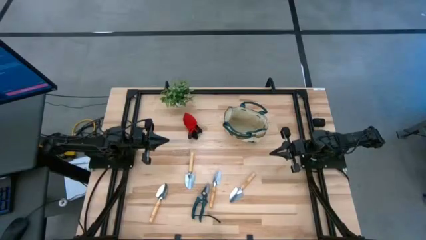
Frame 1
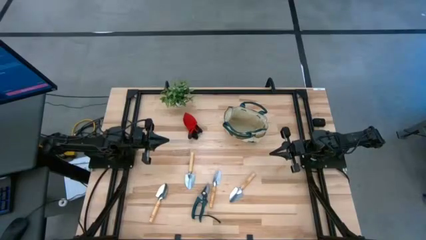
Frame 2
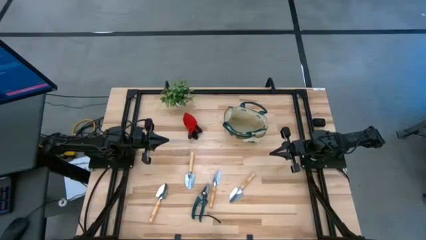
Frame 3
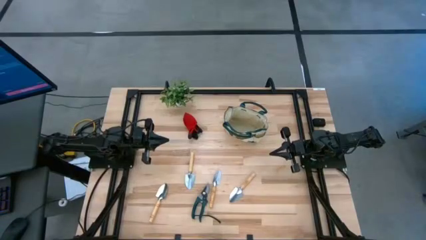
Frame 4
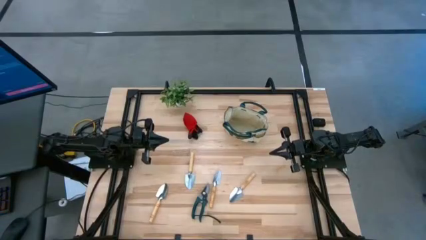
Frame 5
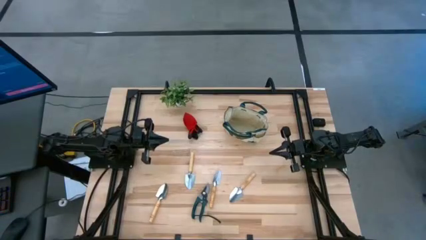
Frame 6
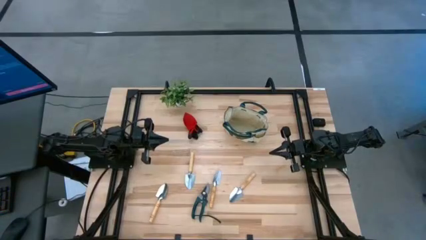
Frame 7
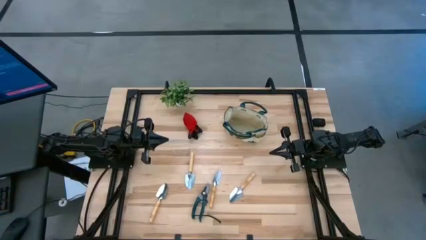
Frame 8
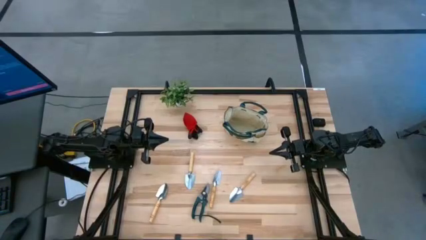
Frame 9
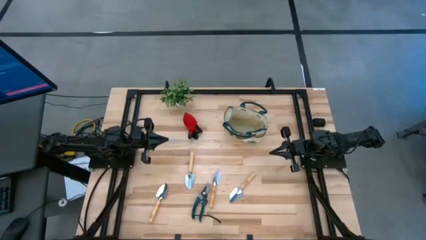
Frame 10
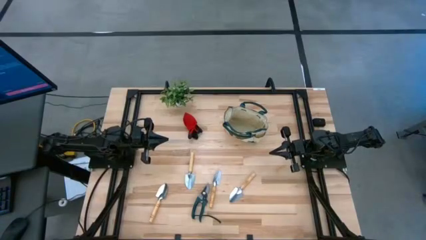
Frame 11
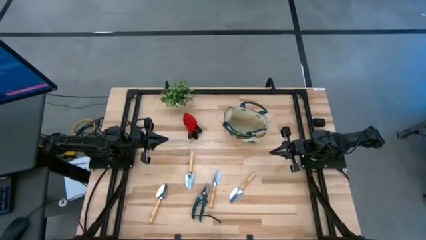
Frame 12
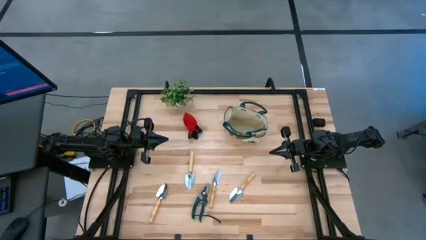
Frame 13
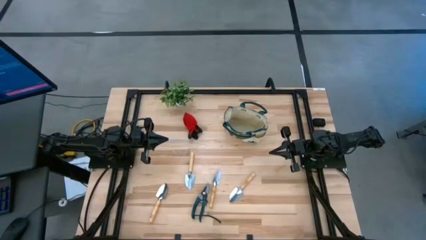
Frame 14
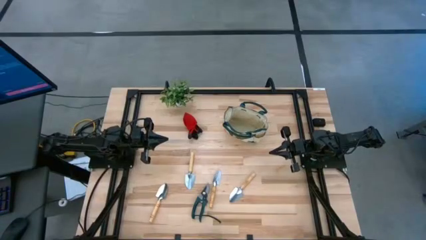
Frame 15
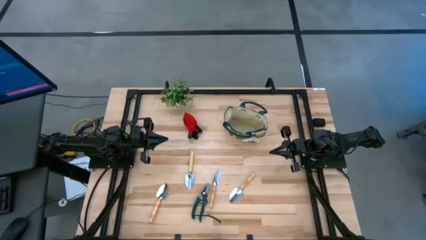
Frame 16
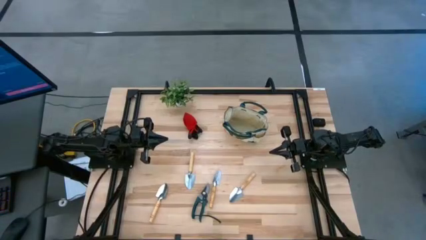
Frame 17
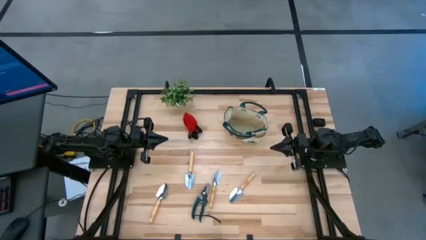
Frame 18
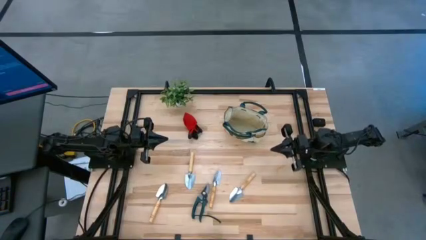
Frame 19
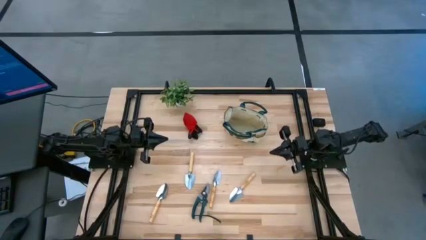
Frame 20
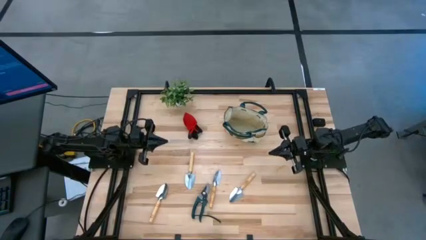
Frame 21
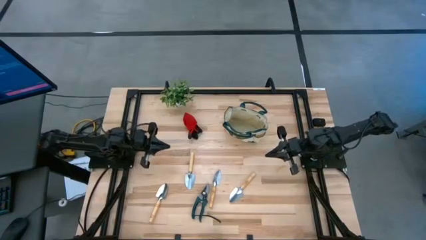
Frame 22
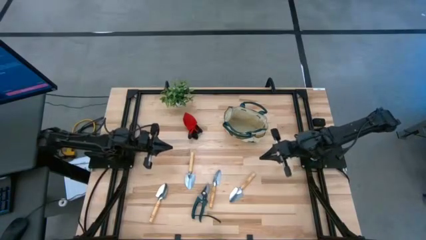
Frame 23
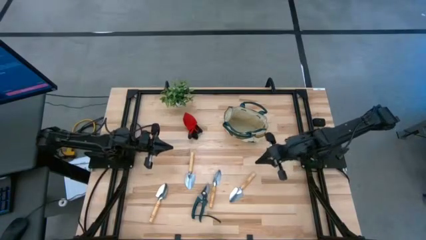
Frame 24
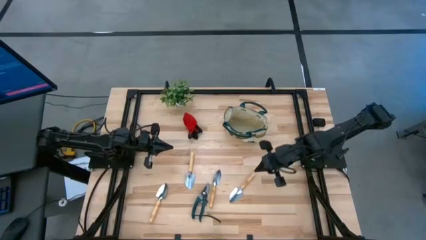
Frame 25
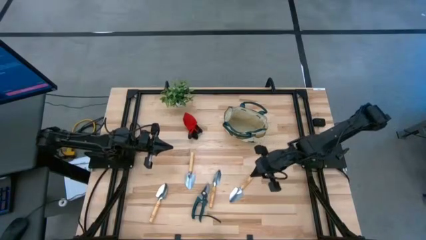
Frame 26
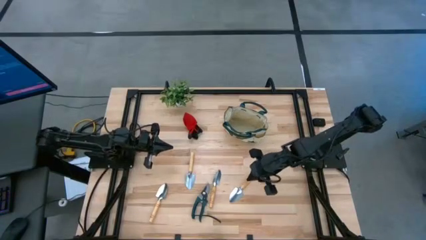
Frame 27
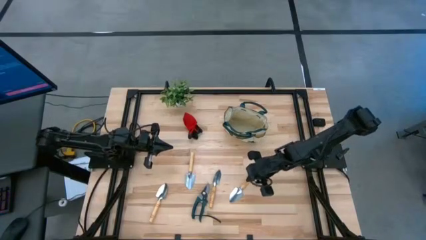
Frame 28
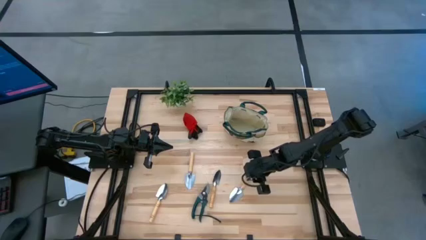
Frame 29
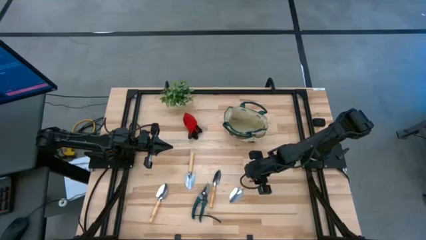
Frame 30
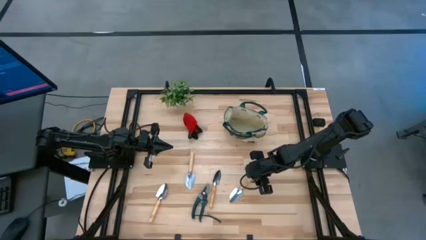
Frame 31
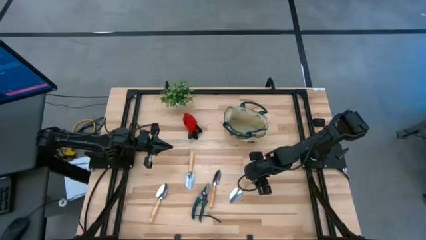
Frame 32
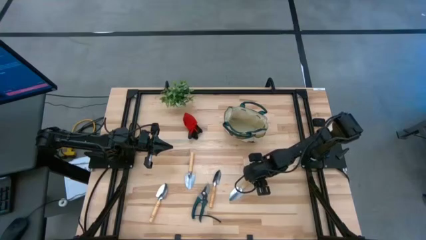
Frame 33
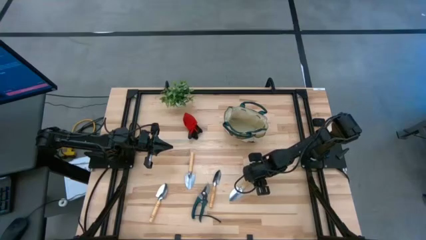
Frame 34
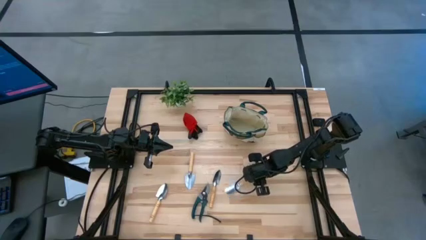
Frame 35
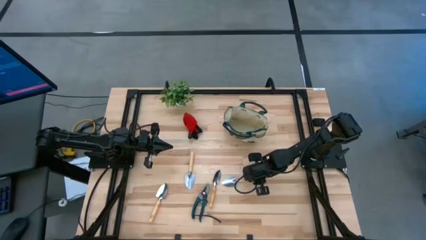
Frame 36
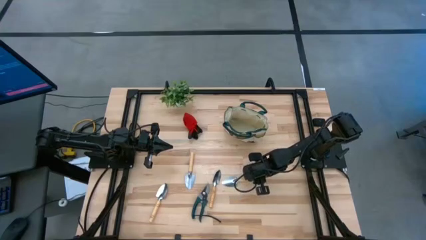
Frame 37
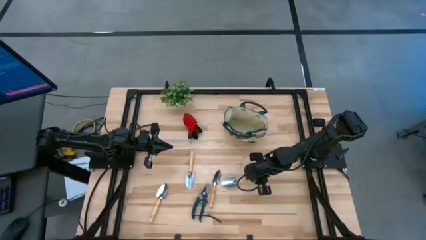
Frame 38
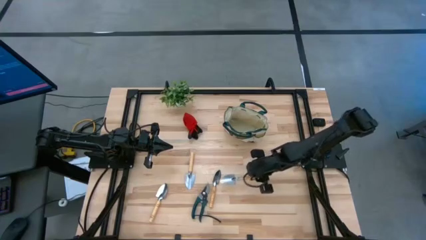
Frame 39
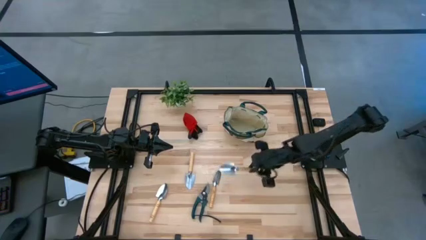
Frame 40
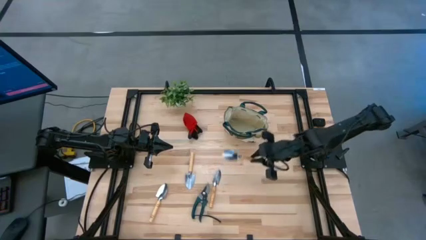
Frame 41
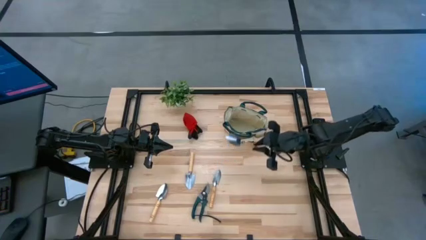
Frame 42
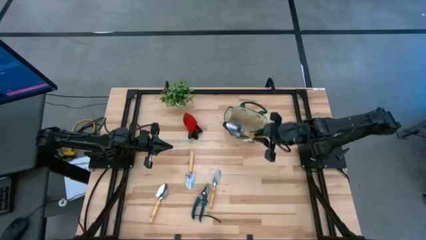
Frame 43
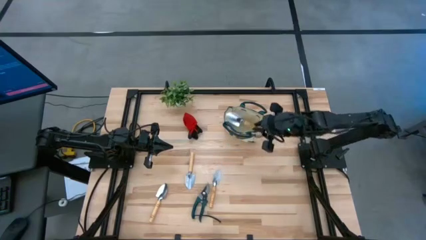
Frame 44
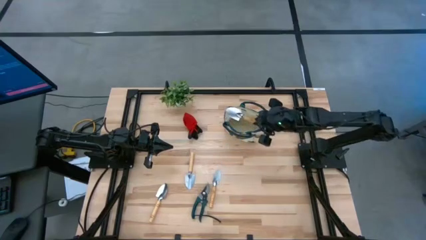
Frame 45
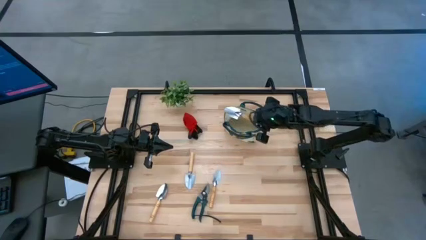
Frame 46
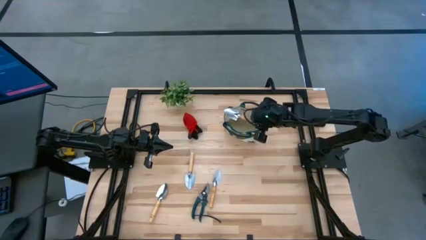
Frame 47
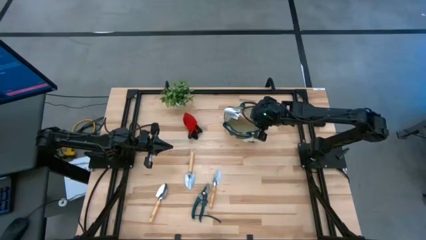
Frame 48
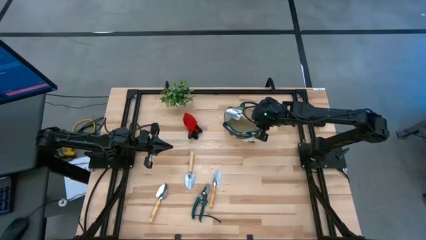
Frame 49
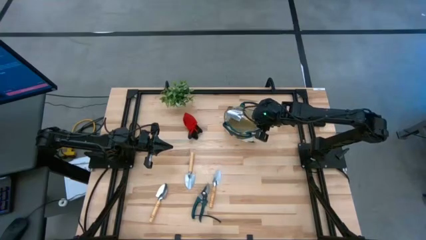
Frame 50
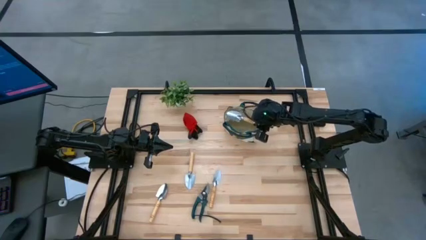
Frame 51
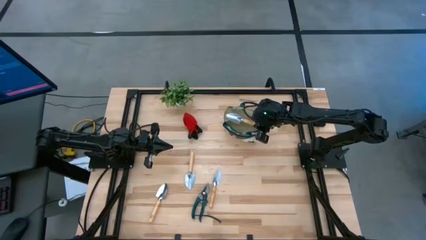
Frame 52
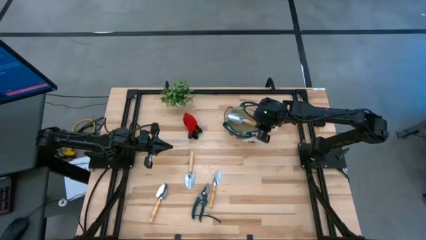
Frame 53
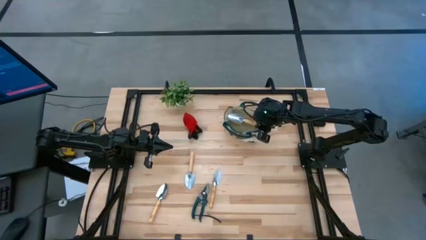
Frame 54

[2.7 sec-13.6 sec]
Task: Pick & Place Garden tools in Gardening bag
Put the trowel into the gardening bag

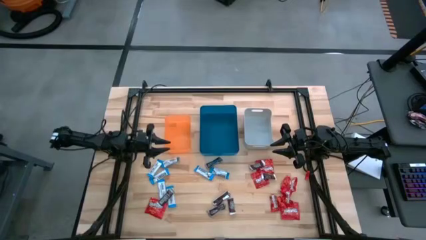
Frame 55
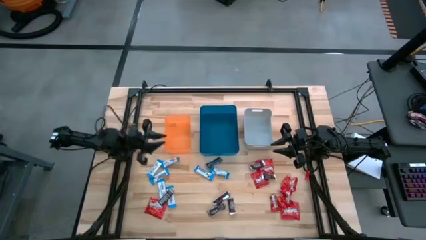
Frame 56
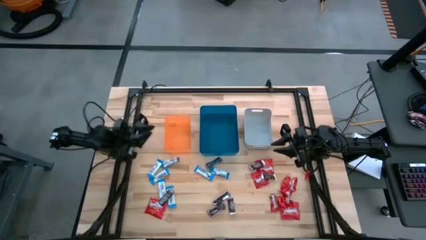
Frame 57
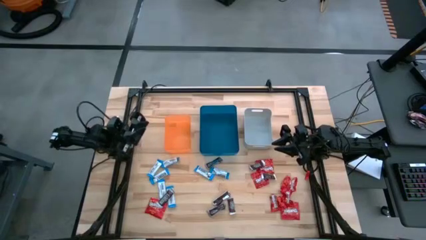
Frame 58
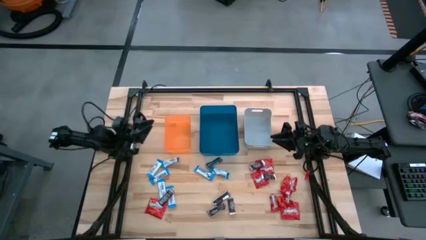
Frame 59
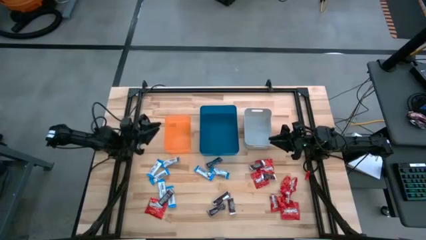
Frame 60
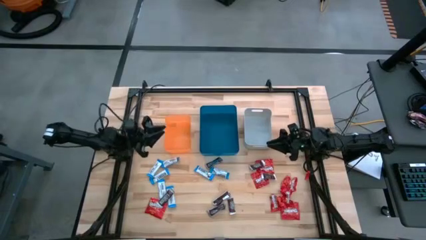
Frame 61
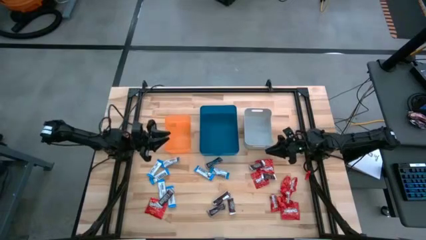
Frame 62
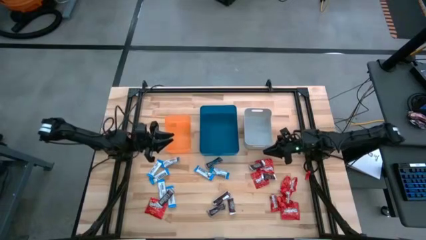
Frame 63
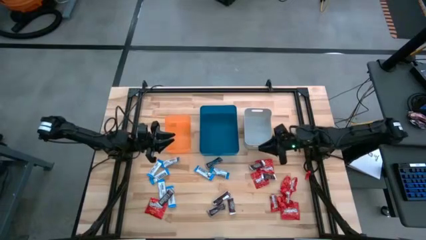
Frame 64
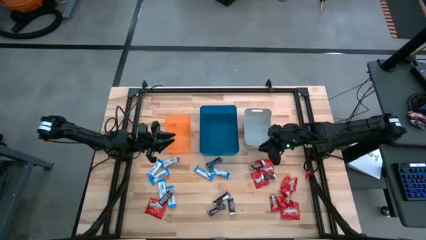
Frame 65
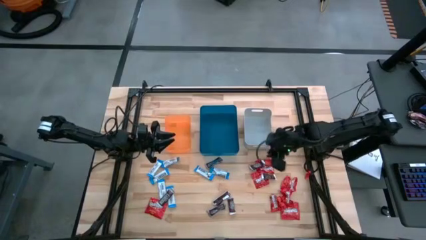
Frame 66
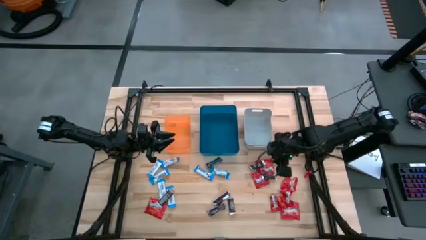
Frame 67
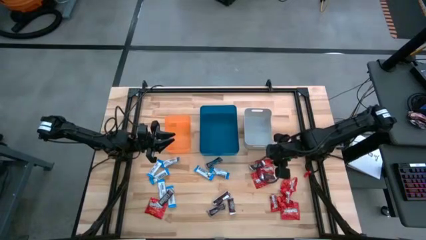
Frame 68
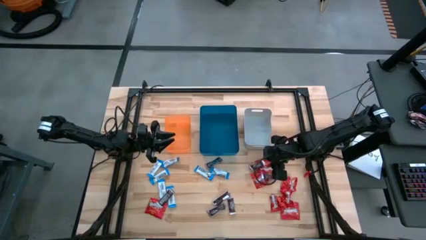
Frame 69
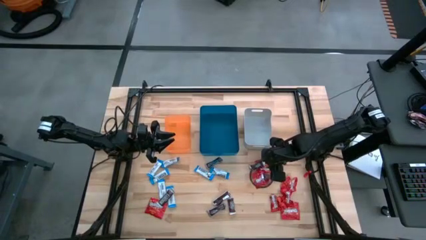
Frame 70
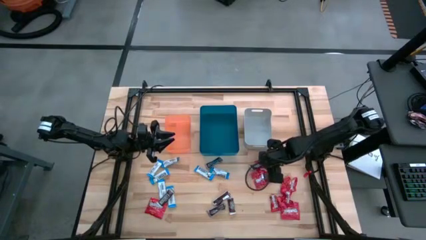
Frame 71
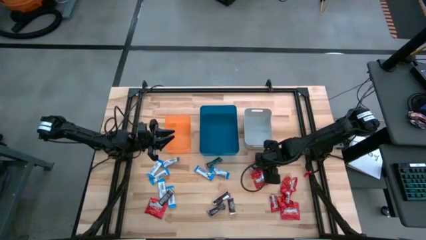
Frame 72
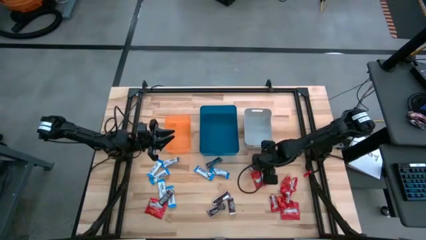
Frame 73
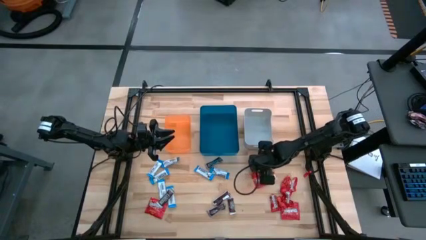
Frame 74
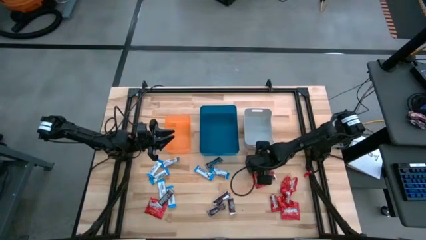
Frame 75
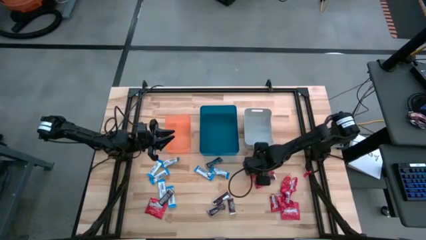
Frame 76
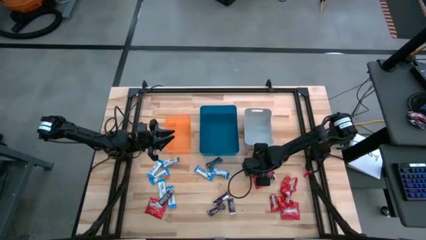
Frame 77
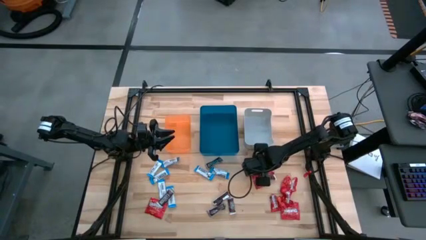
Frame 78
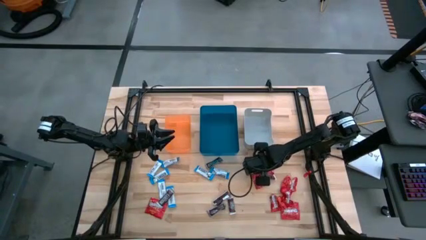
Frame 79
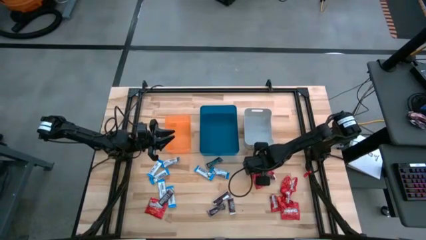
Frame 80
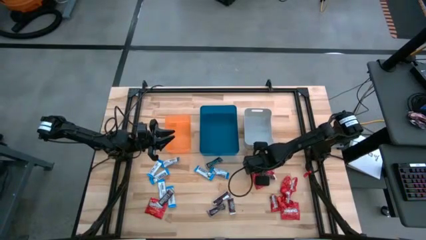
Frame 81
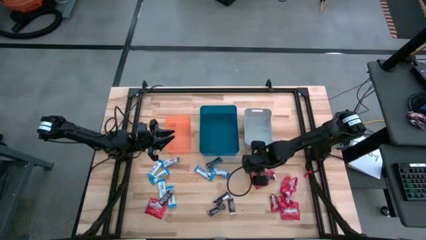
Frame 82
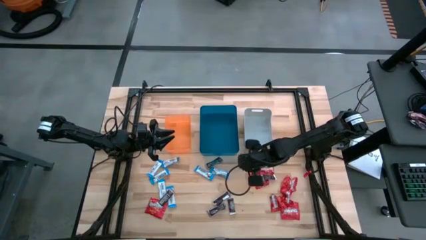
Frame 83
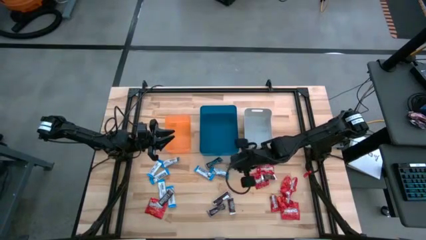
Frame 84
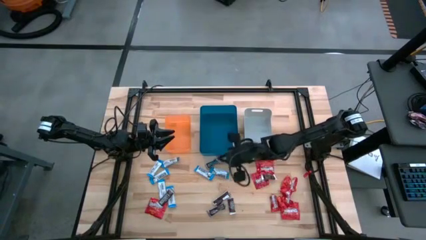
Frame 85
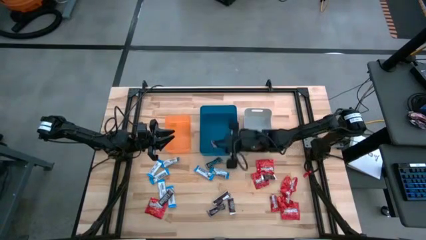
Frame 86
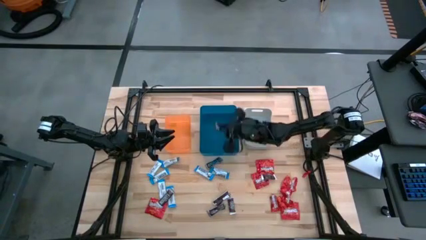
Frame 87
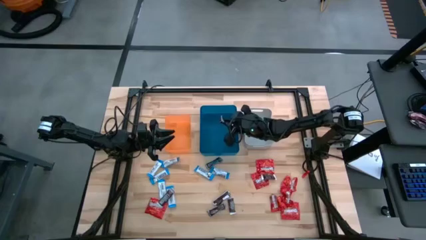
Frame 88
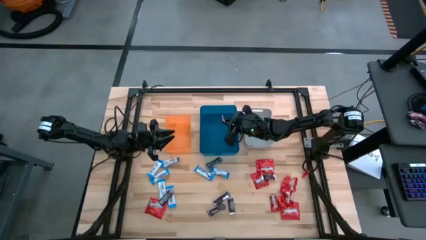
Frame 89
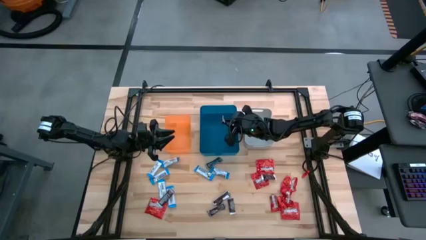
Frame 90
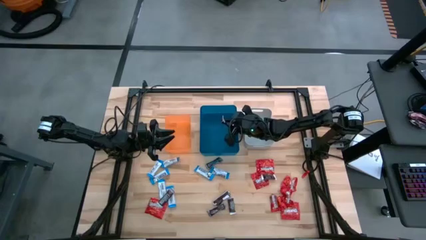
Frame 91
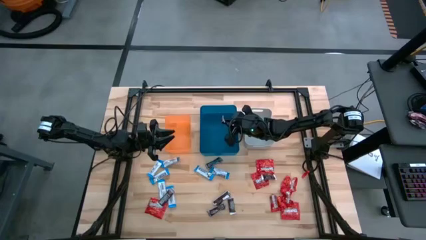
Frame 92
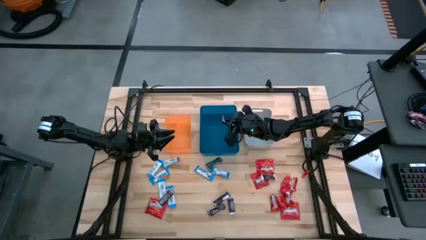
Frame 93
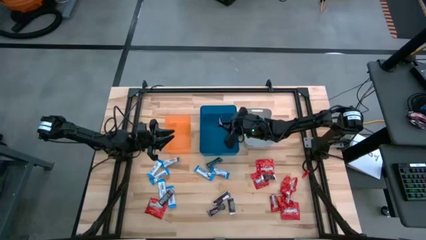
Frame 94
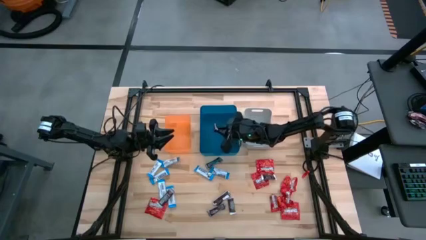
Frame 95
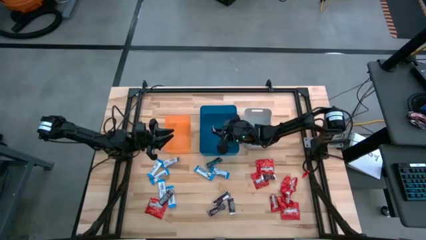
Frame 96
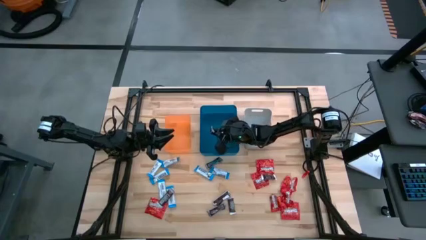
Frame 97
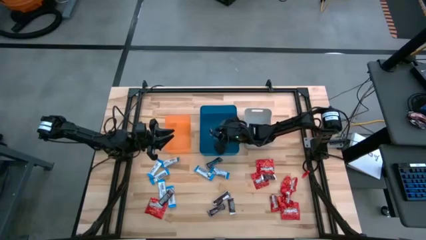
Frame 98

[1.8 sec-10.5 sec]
Task: Sort candy
Put the brown chocolate bar into the blue bin
